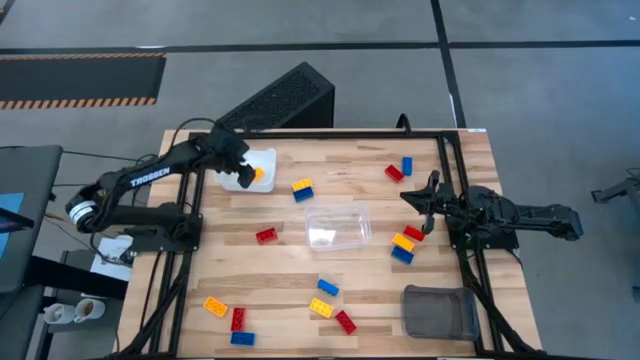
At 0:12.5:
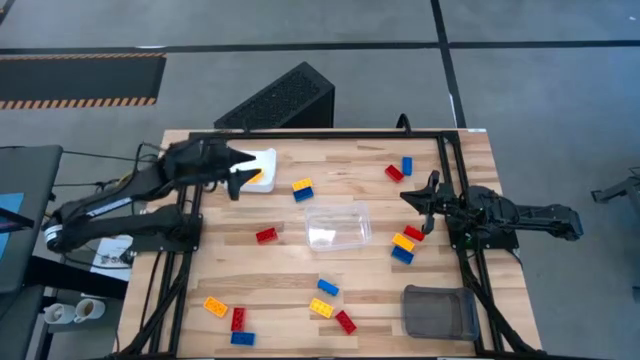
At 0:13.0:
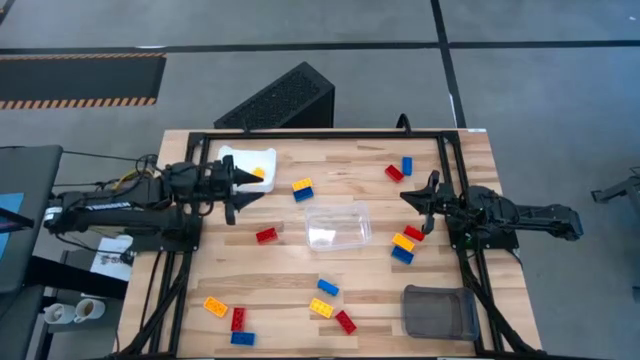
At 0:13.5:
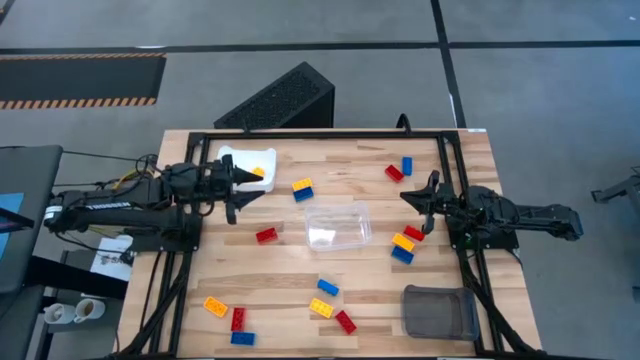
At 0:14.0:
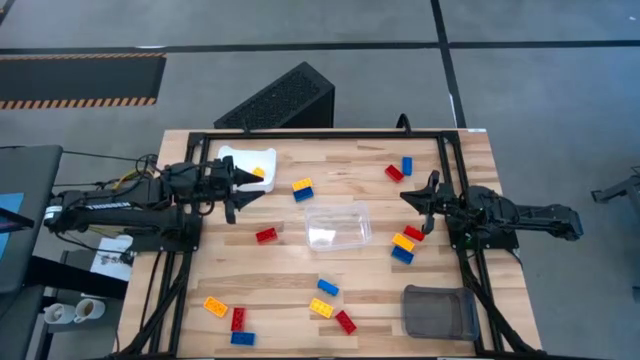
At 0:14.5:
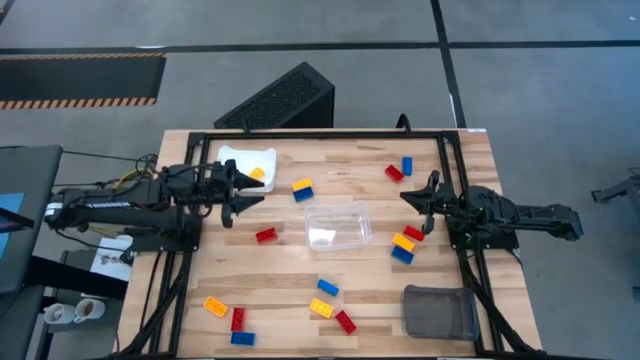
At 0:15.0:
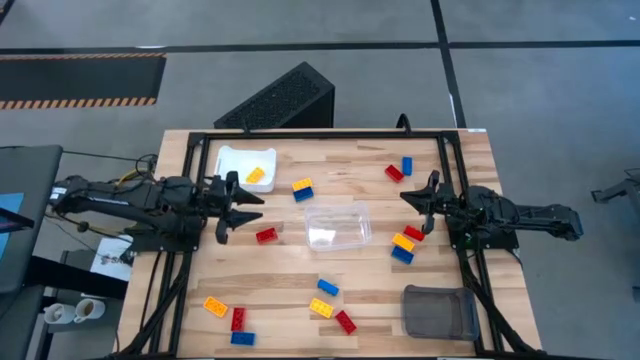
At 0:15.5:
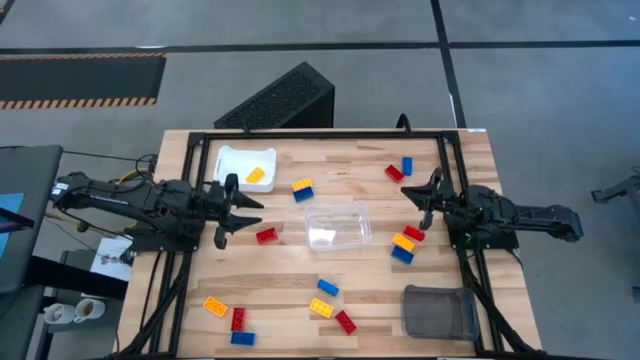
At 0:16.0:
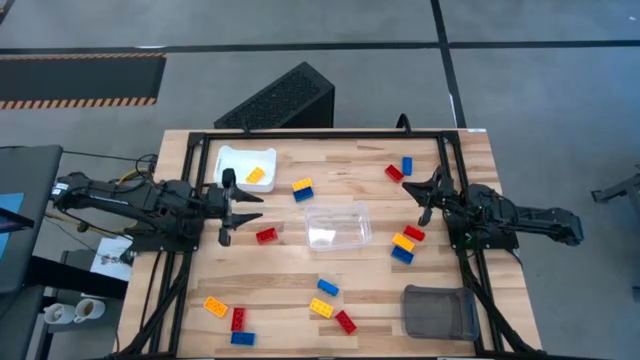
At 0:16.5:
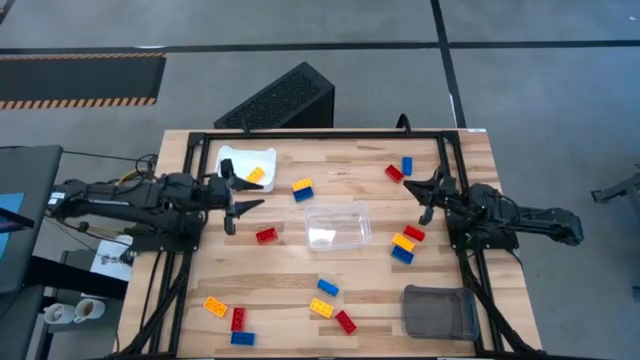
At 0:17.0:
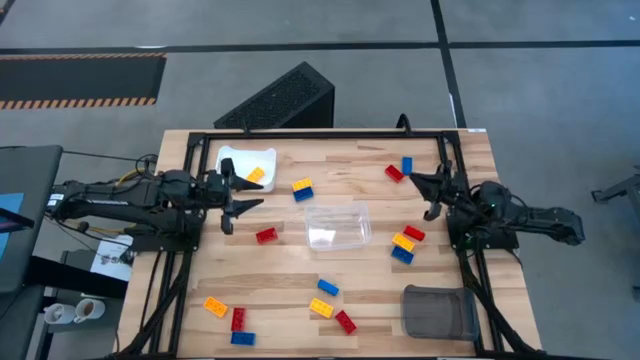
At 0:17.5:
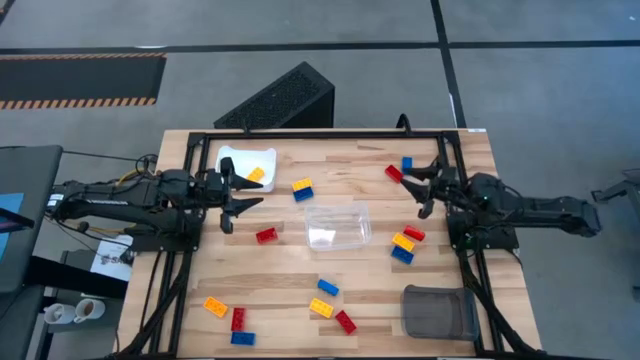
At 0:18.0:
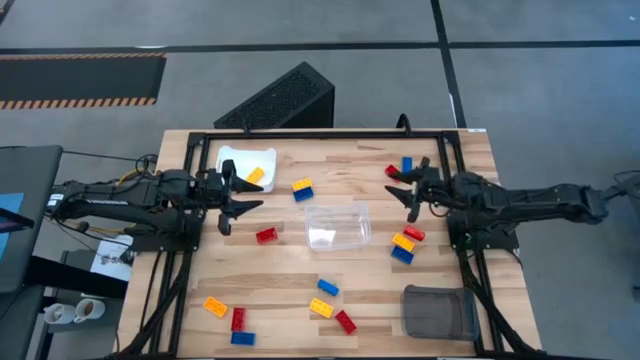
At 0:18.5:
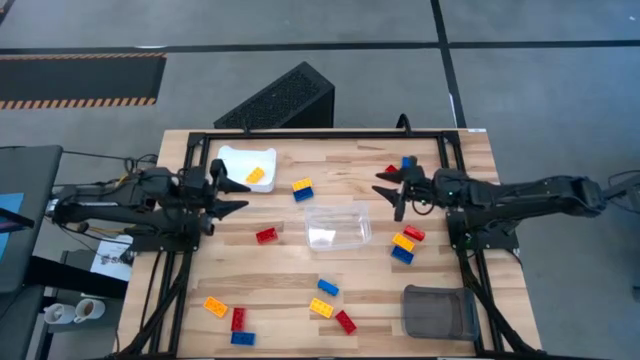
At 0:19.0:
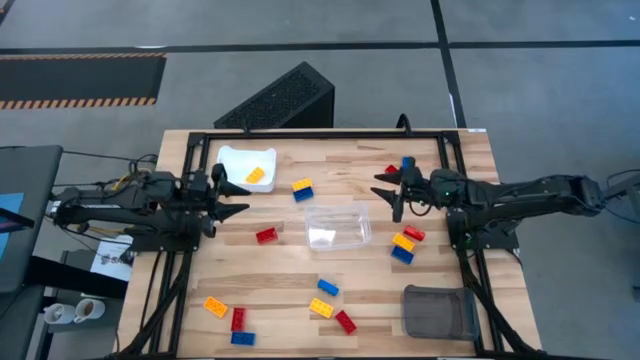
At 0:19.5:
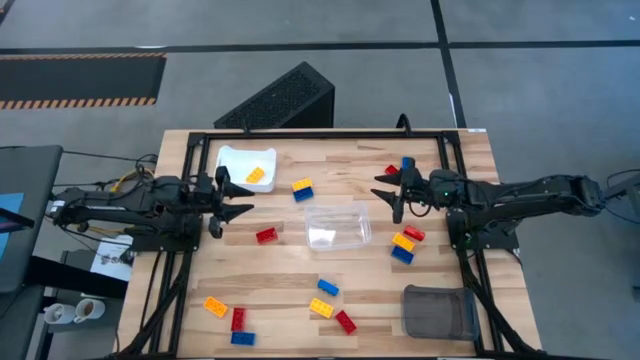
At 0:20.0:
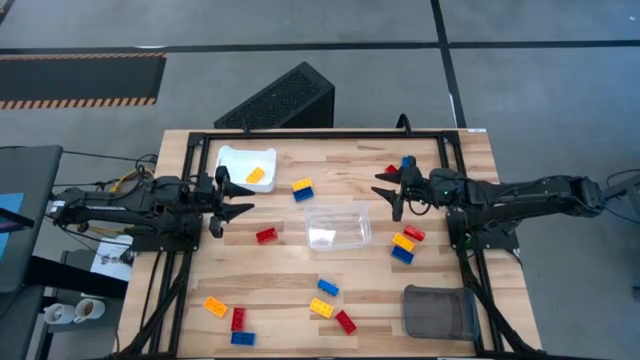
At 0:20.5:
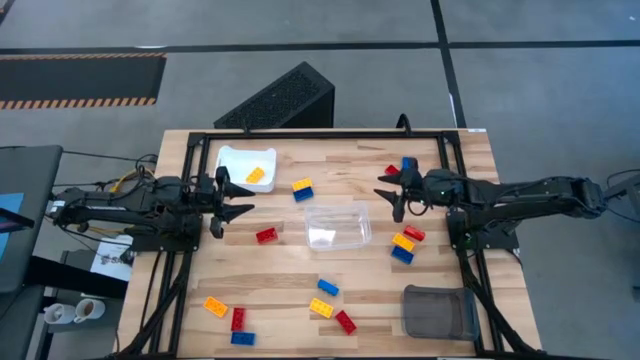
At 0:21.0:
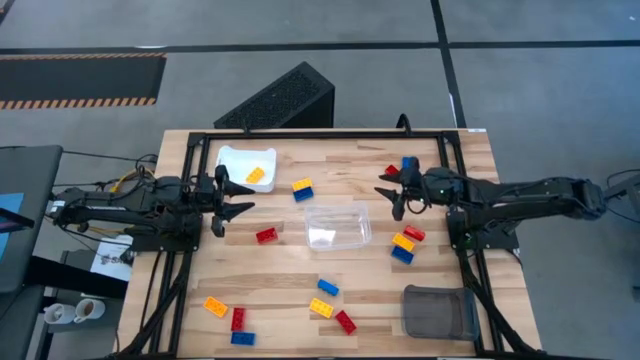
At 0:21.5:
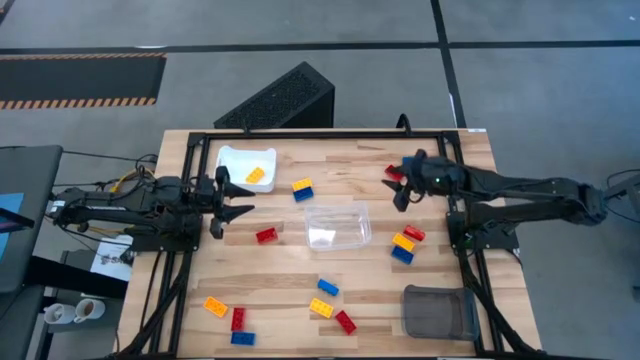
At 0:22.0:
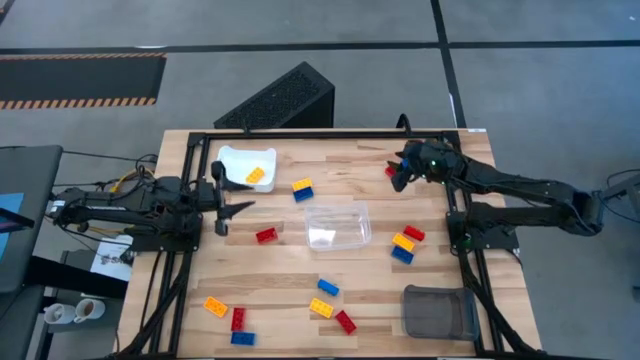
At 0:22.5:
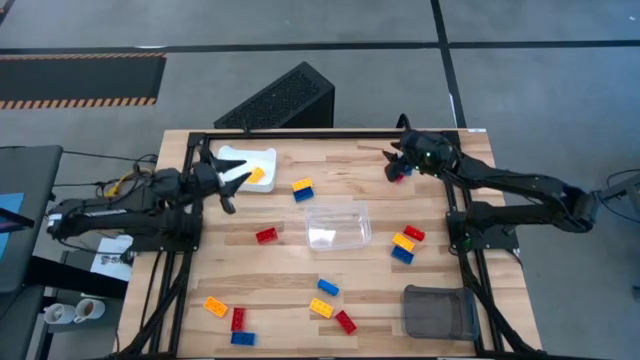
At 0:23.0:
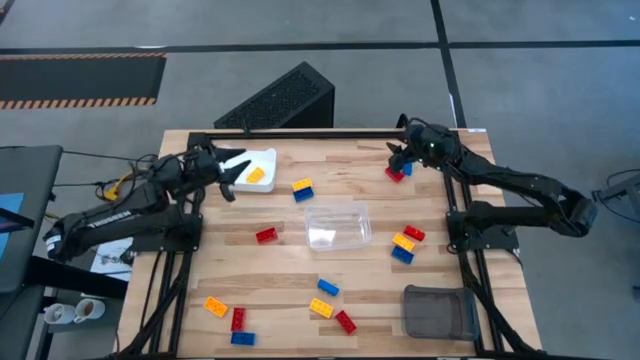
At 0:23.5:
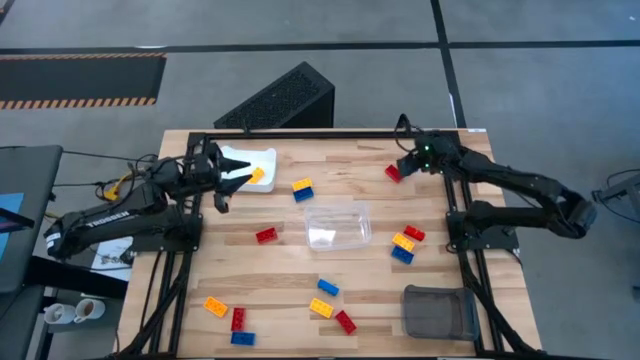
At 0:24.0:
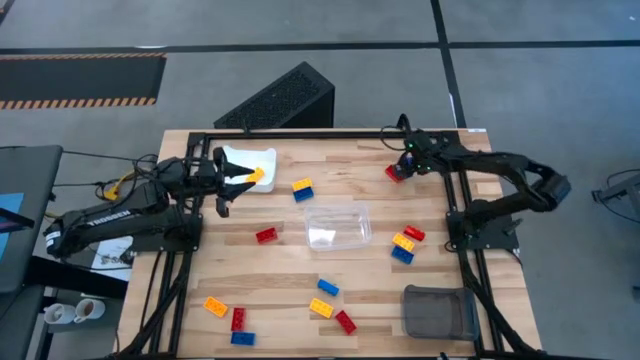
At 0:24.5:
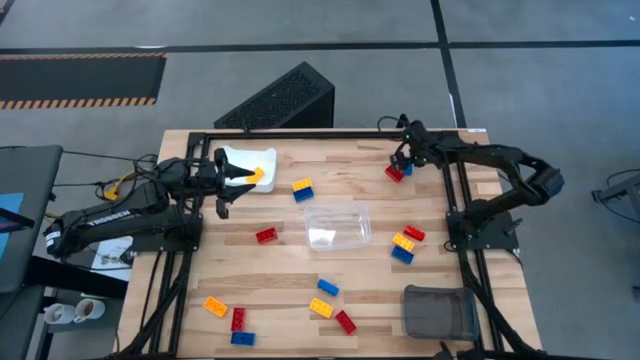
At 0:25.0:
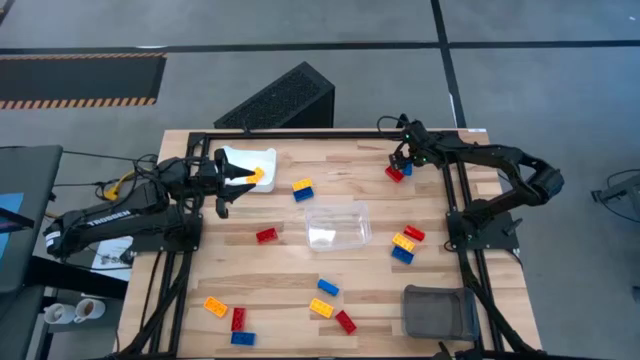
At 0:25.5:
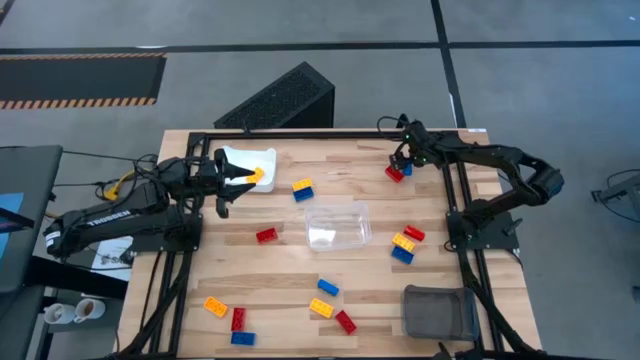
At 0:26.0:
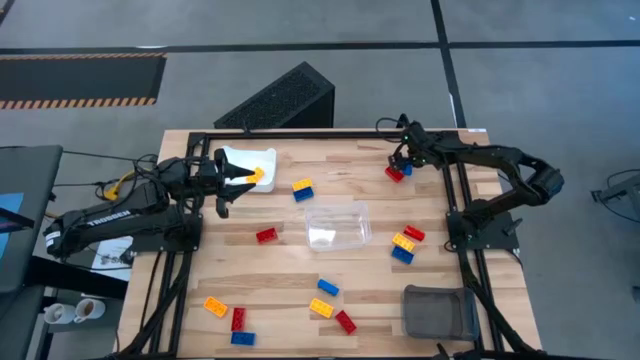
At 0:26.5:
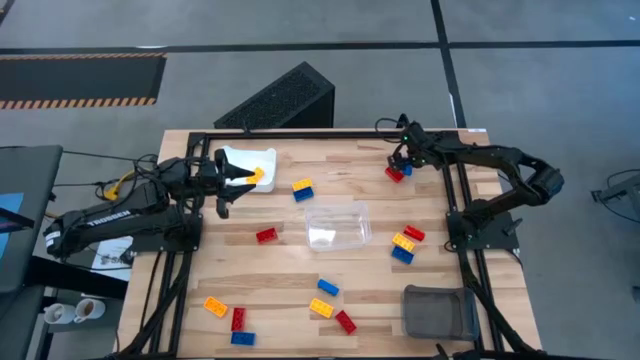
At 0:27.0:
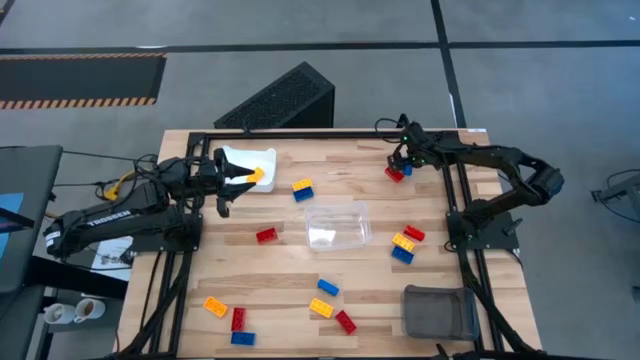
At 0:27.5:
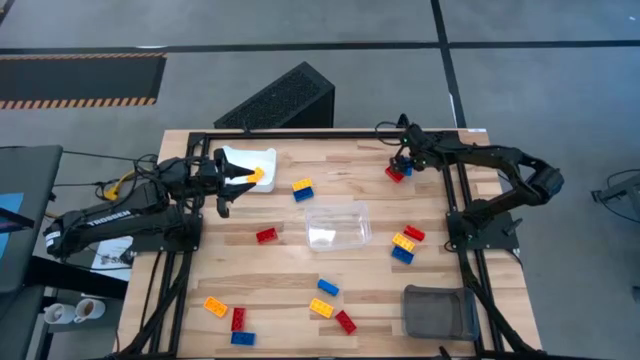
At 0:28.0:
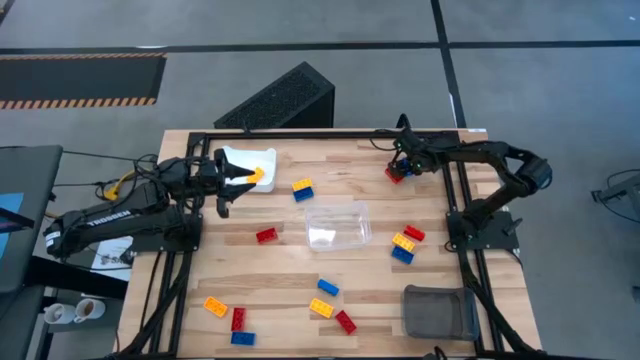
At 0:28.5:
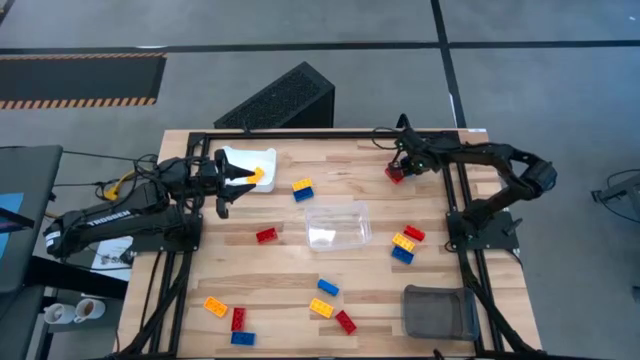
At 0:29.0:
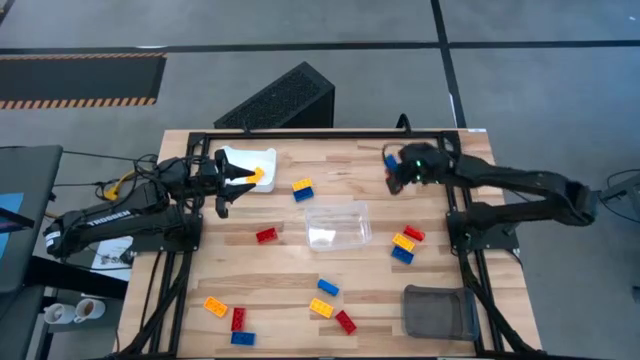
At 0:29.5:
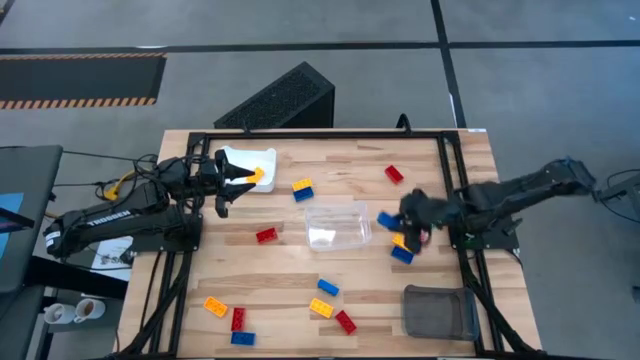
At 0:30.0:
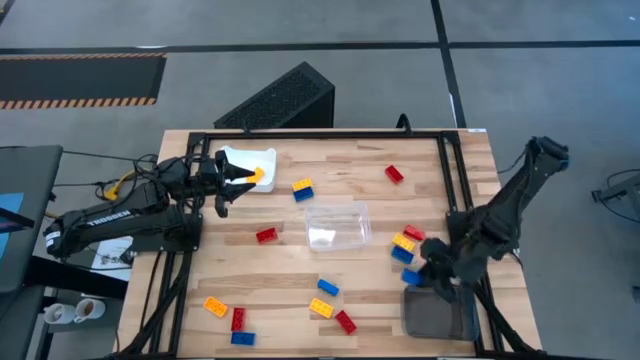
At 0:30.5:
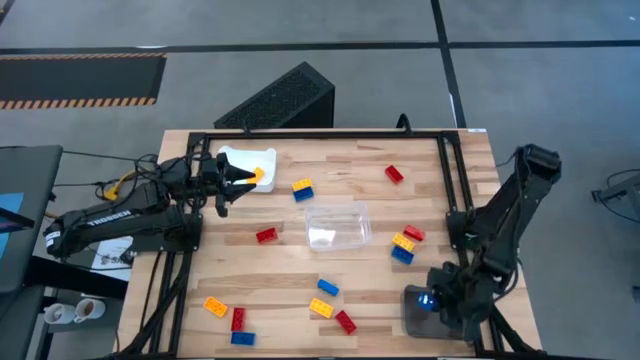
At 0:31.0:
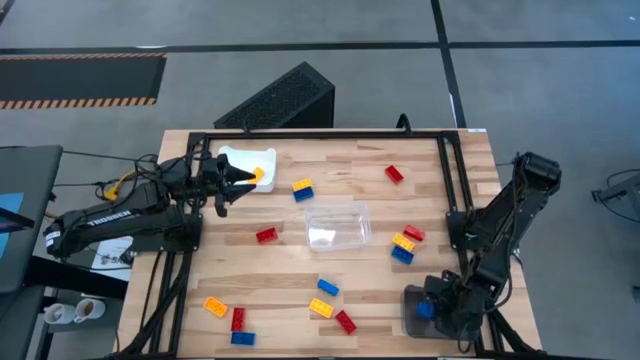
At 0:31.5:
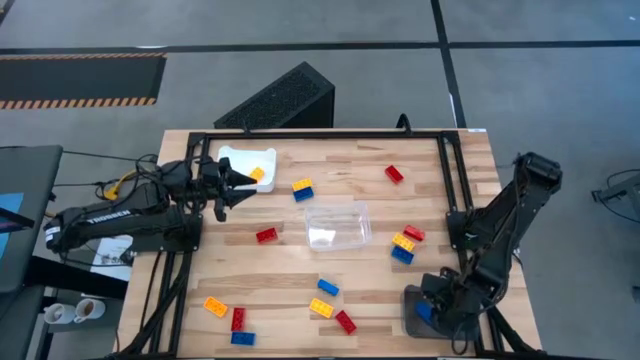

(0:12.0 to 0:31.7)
Task: Sort & place blocks by color
Put the blue game piece into the black bin
